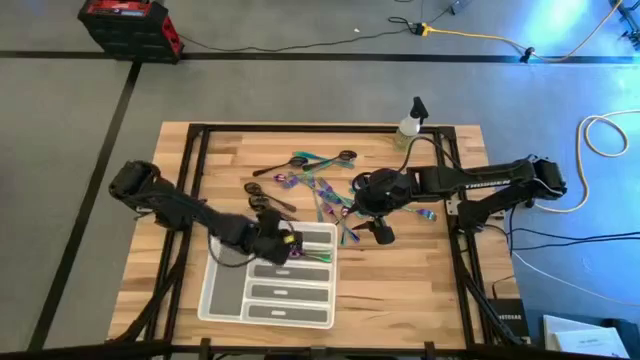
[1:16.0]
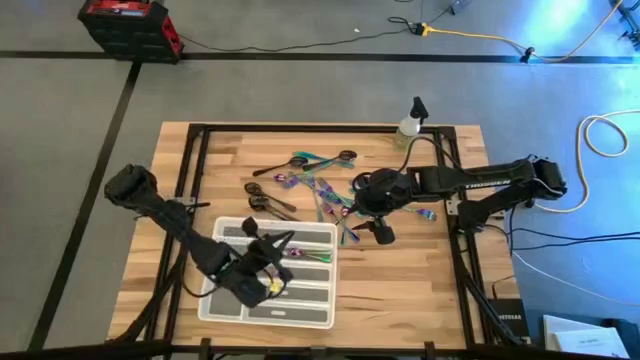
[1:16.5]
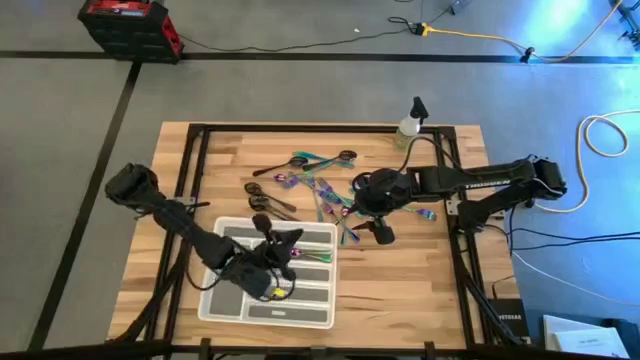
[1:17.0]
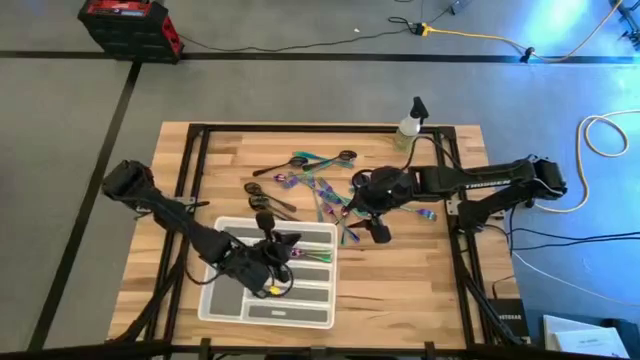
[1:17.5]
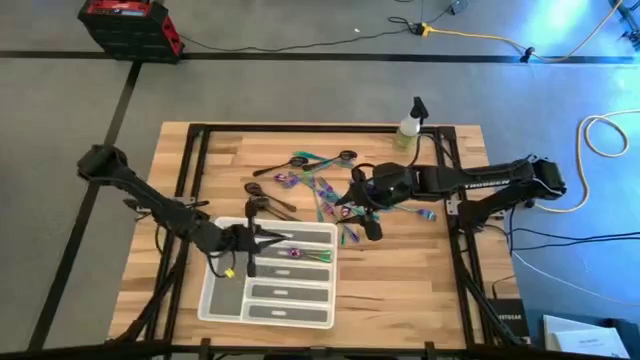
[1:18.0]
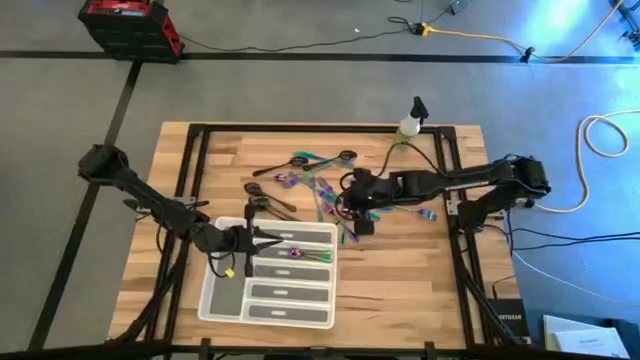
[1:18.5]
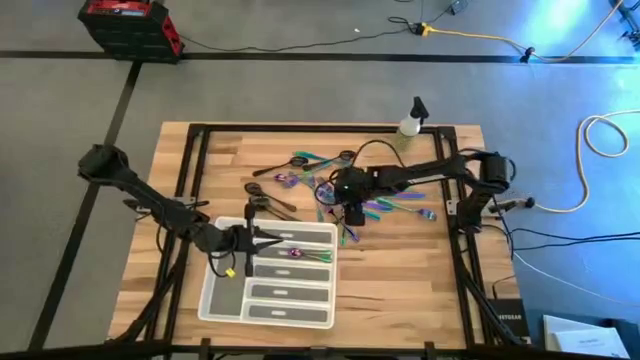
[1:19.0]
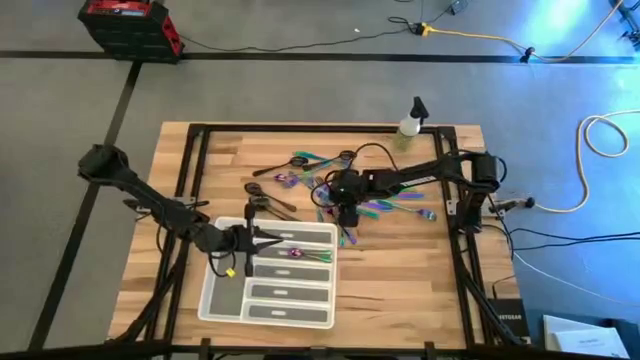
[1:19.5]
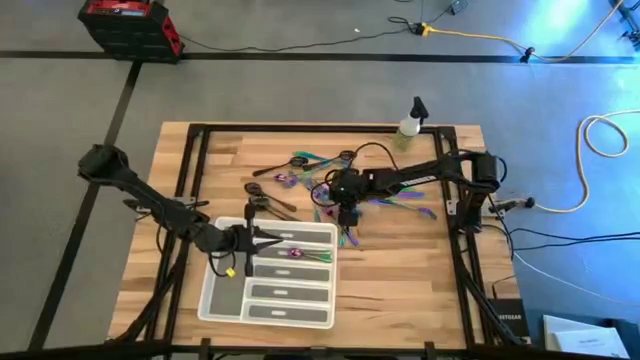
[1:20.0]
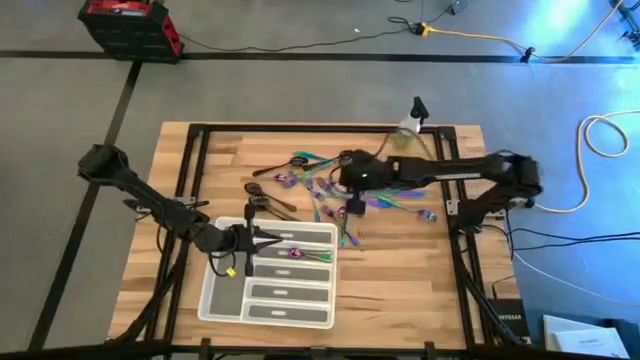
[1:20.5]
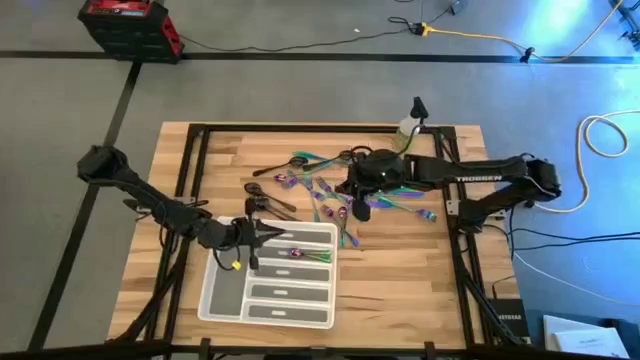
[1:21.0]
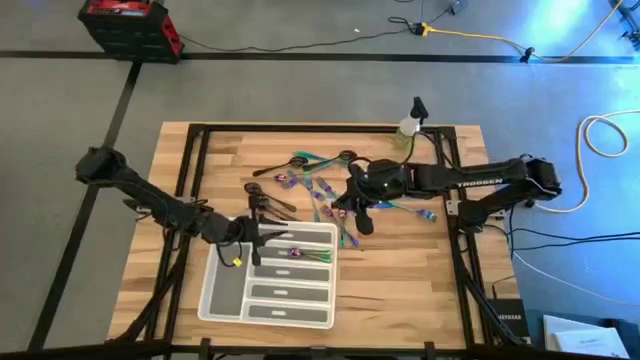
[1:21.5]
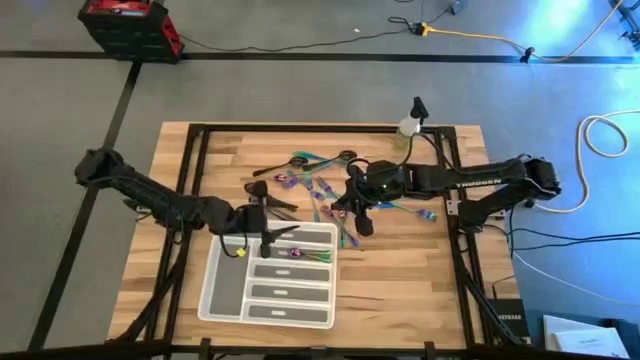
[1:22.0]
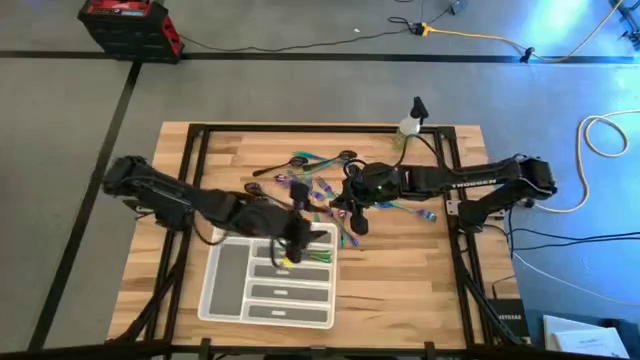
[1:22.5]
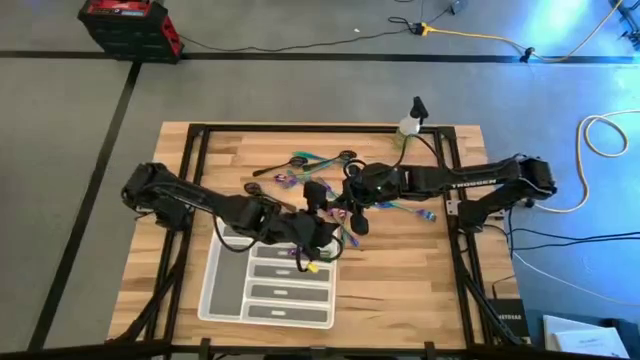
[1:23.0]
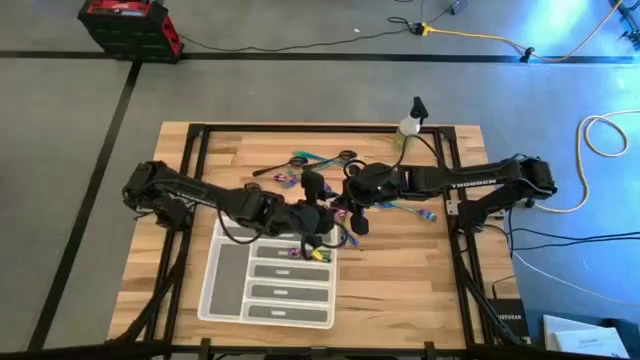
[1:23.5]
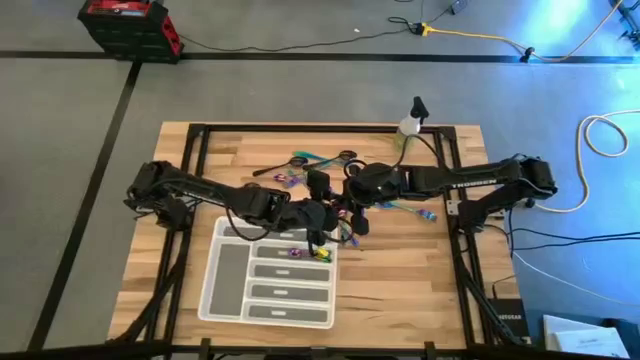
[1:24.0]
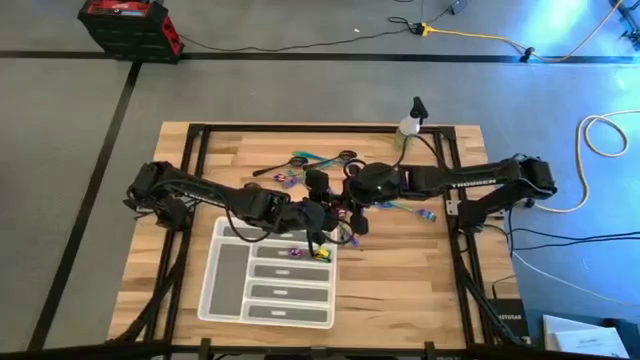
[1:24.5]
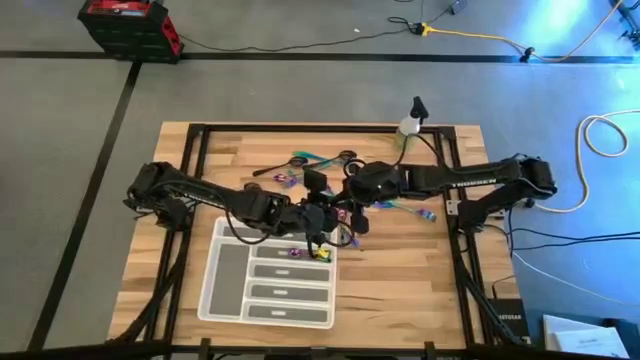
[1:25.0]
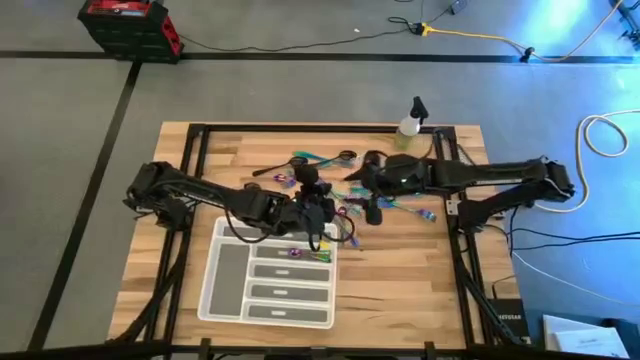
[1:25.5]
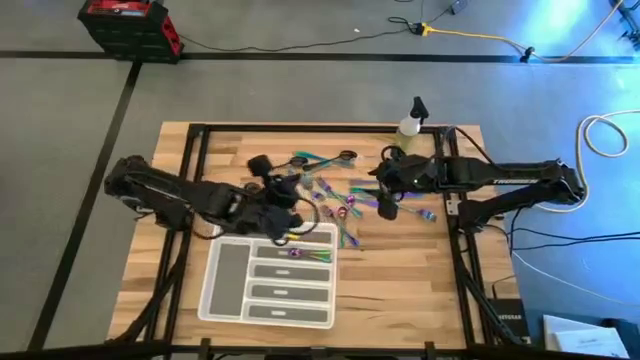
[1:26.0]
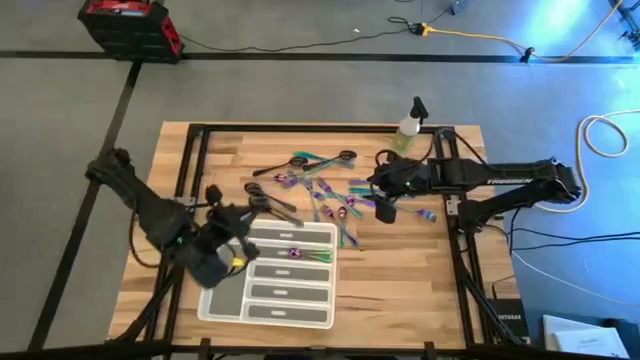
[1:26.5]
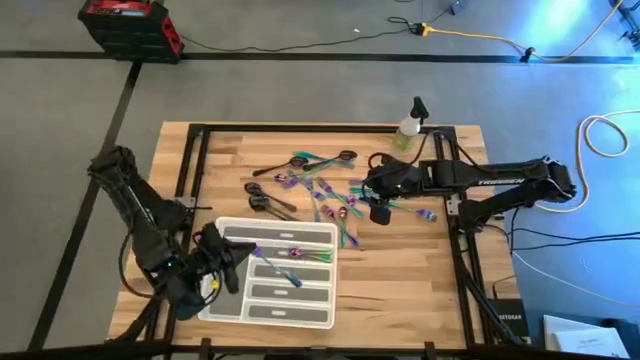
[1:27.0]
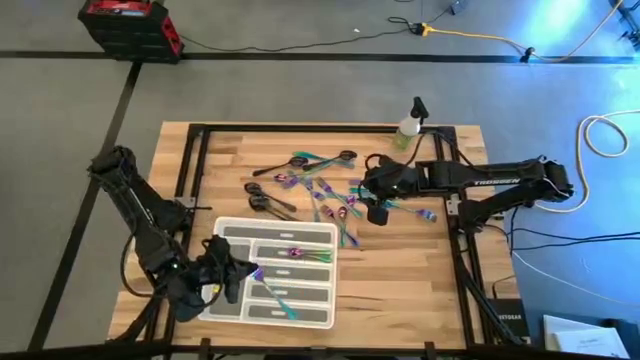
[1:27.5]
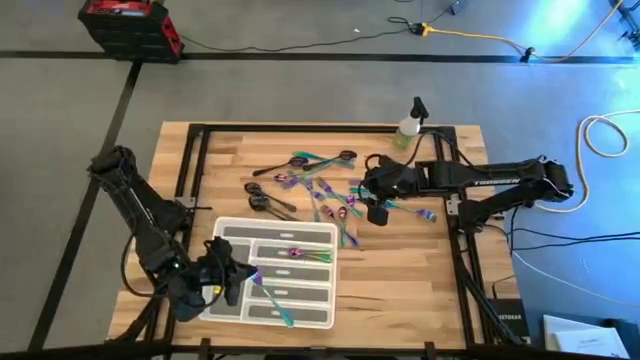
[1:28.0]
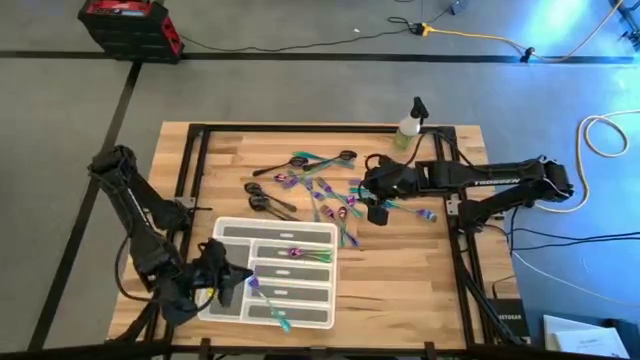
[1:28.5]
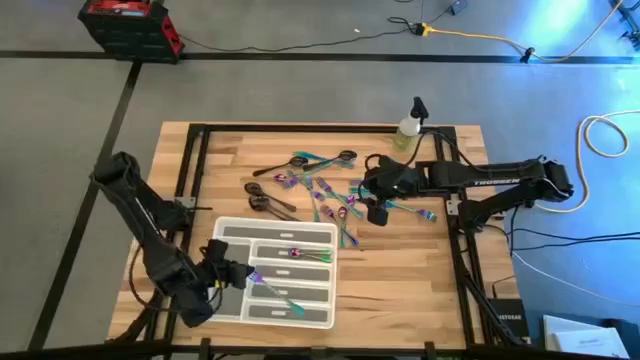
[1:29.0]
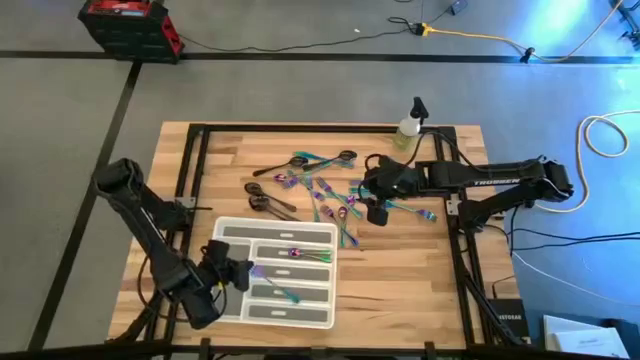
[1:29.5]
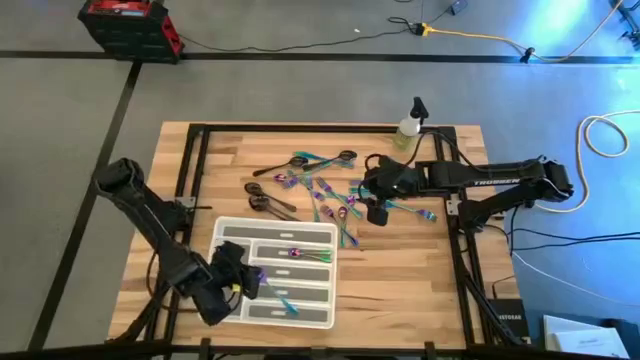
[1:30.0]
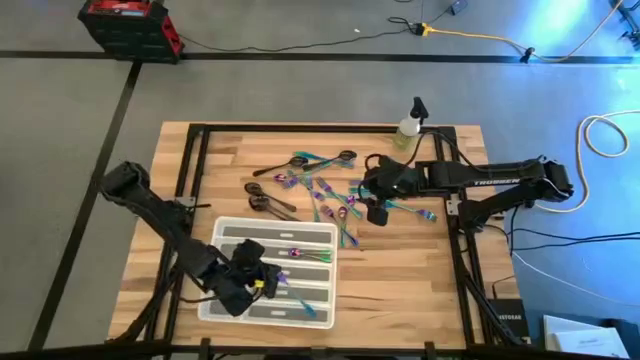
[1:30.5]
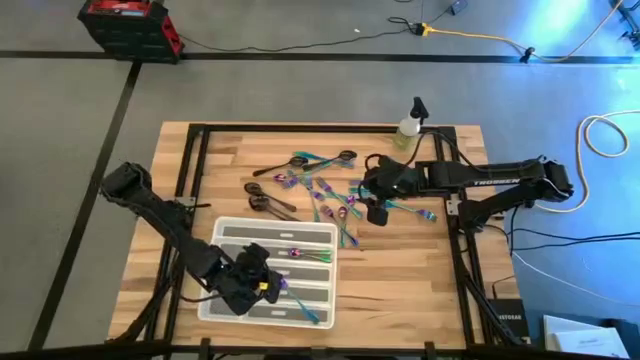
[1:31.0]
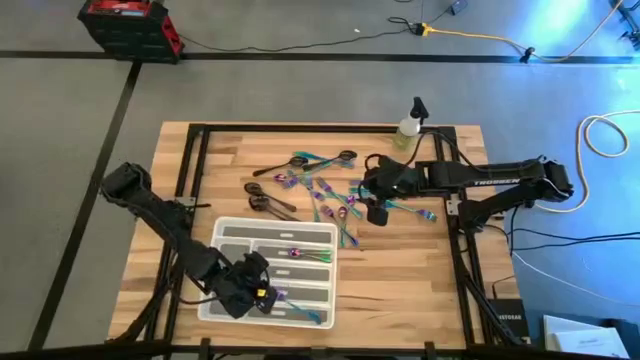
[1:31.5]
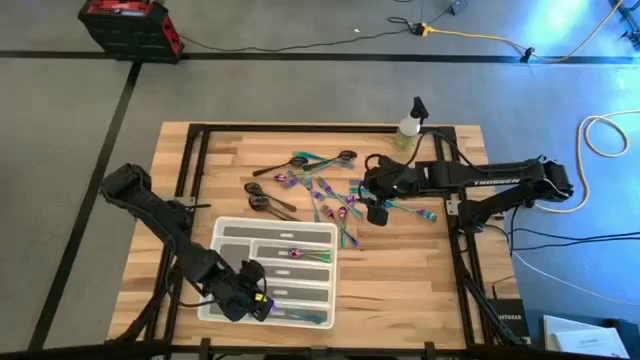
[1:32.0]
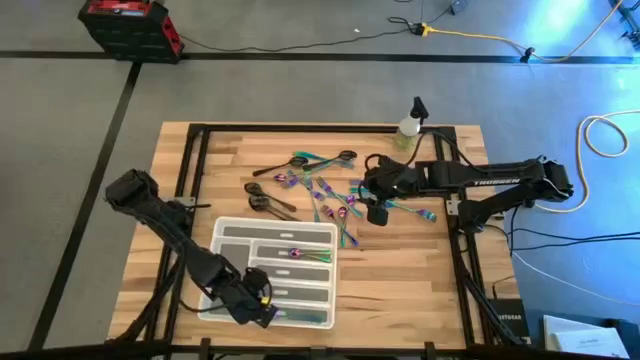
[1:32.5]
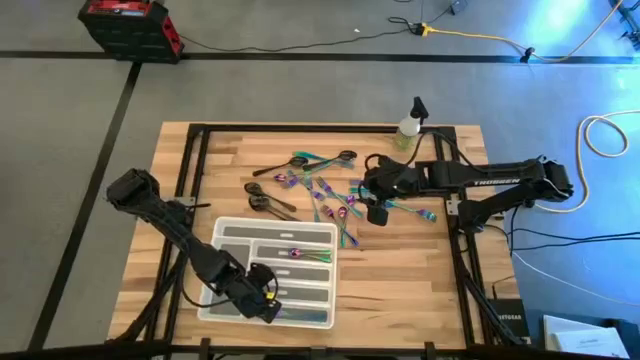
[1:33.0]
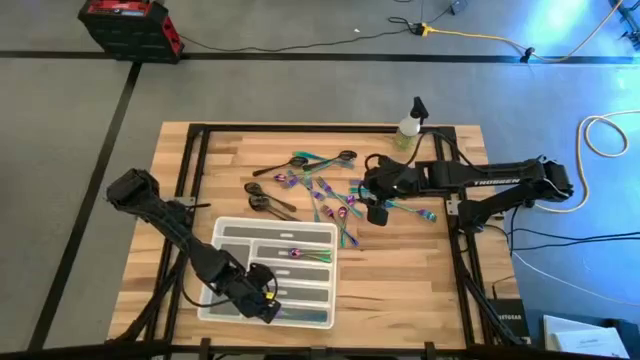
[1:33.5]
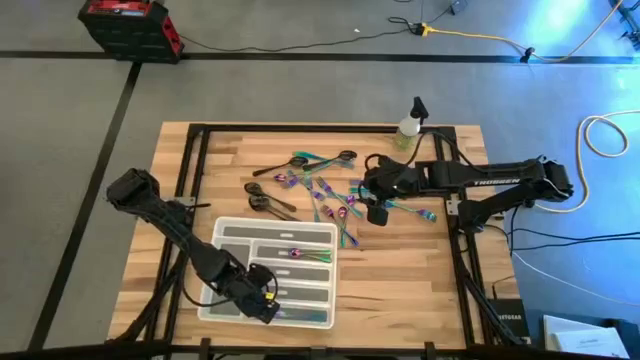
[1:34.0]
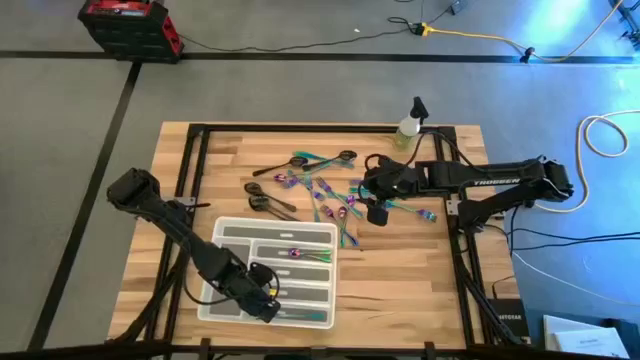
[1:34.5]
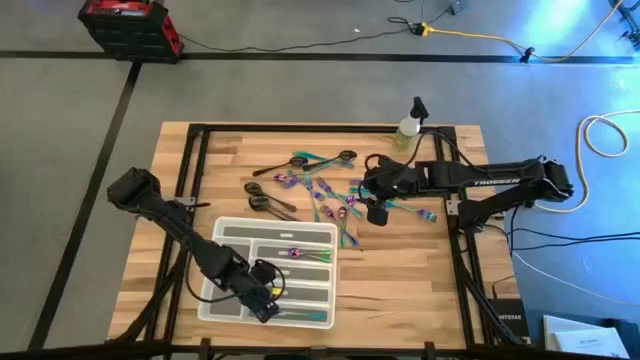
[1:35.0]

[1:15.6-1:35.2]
Task: Sort silverware
Put the blue fork into the white silverware tray

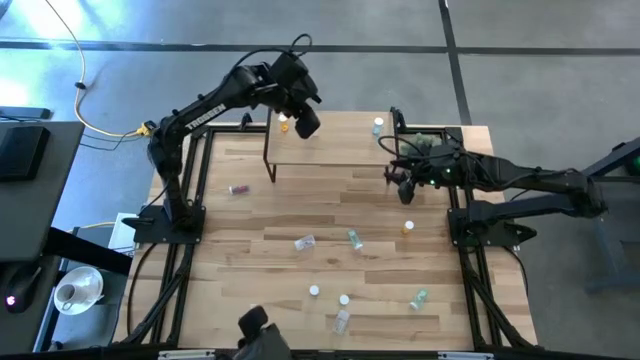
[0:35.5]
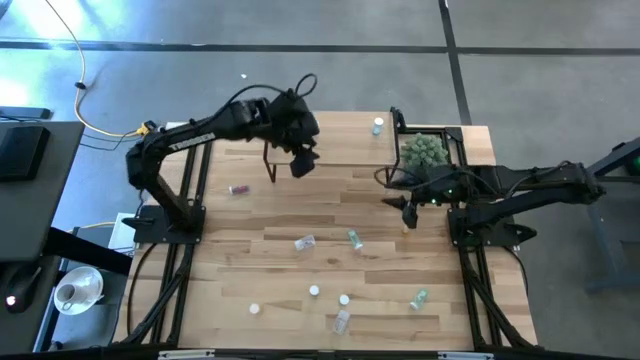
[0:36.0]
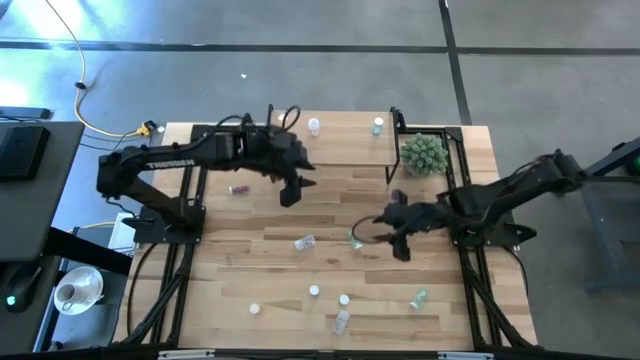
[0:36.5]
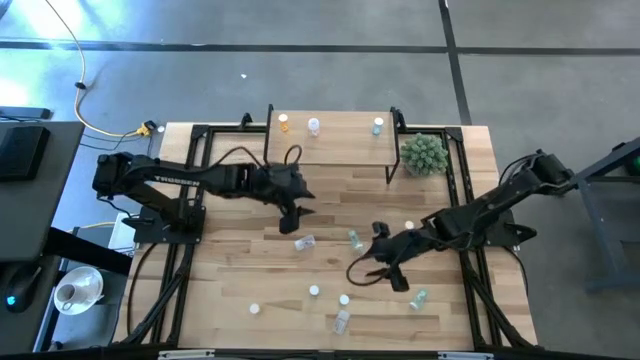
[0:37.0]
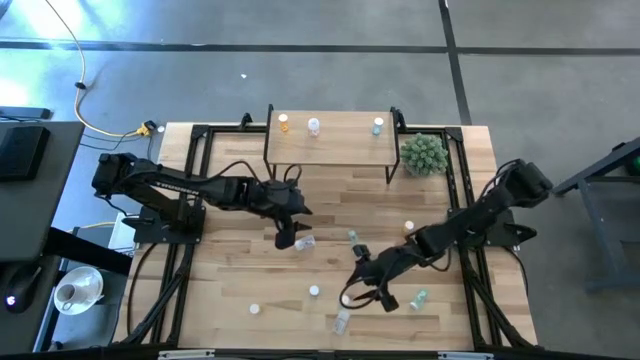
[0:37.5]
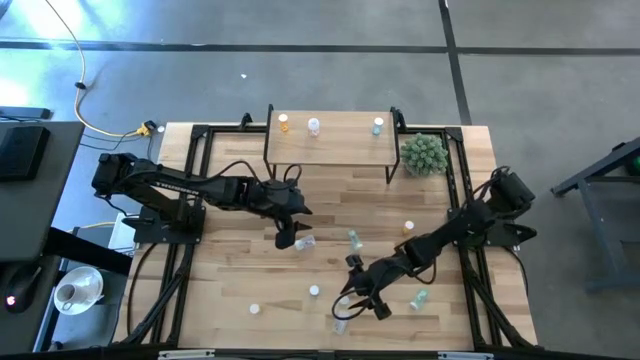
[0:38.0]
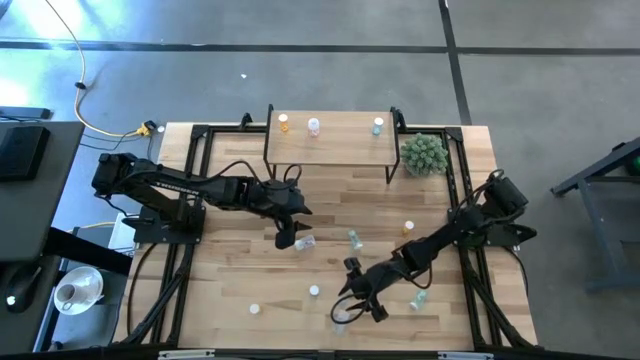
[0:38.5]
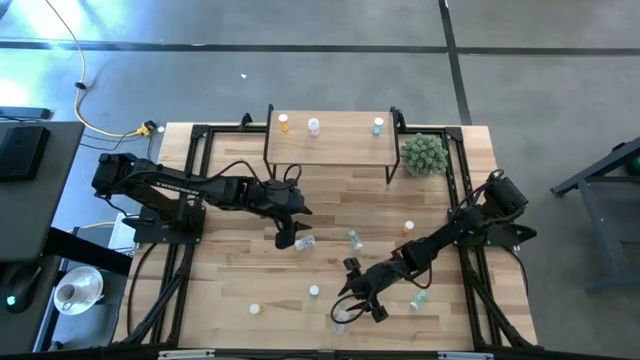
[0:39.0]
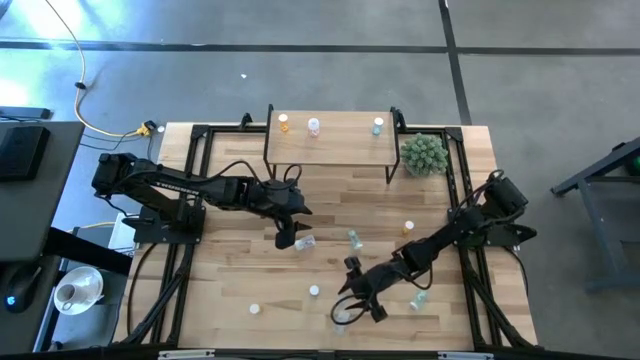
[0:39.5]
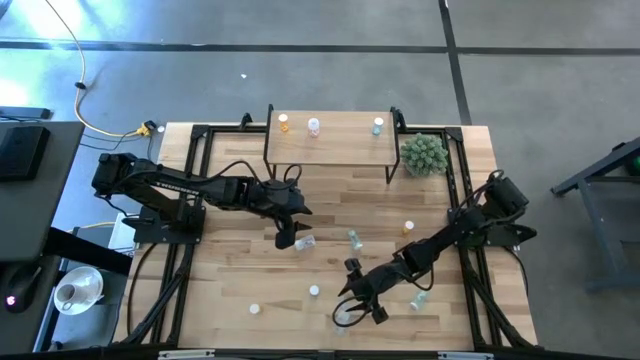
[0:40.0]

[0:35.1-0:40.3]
Task: Pick and place medicine bottles onto shelf by color
Put the bottom green pill bottle on the shelf
